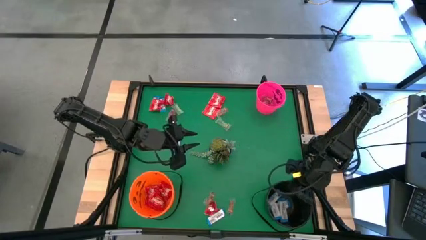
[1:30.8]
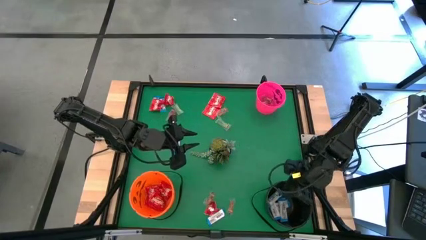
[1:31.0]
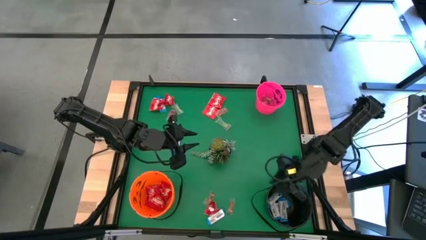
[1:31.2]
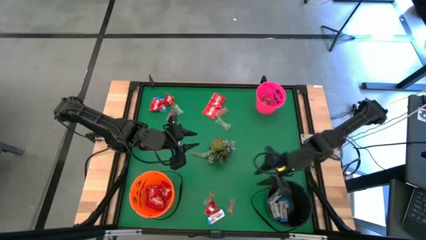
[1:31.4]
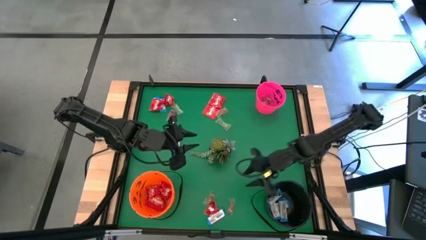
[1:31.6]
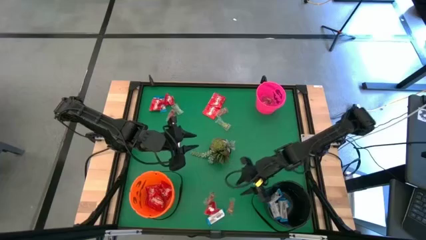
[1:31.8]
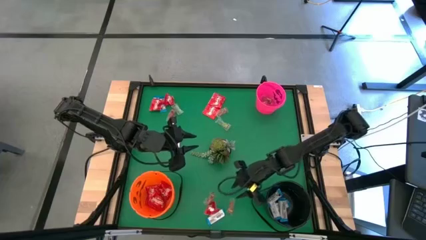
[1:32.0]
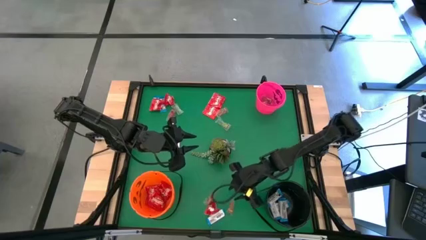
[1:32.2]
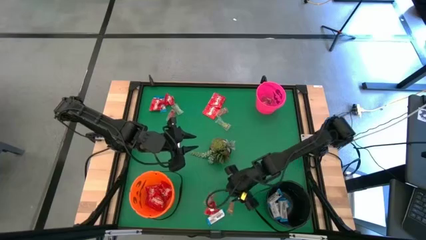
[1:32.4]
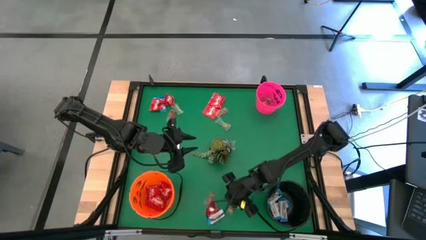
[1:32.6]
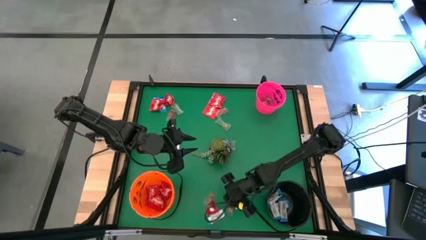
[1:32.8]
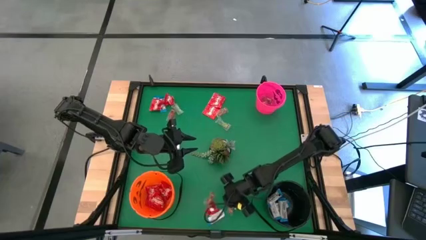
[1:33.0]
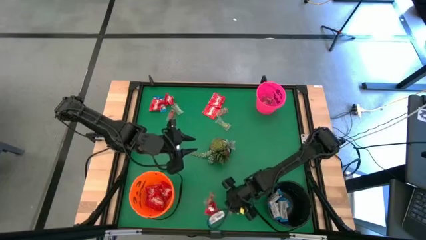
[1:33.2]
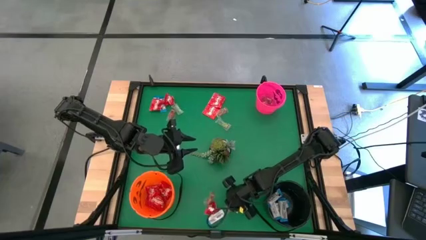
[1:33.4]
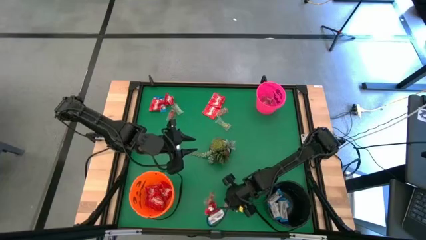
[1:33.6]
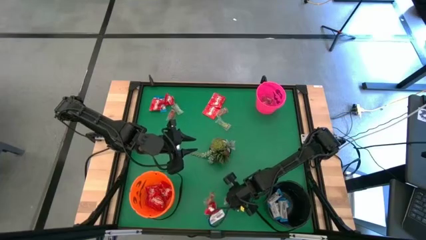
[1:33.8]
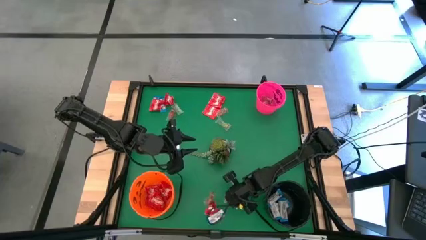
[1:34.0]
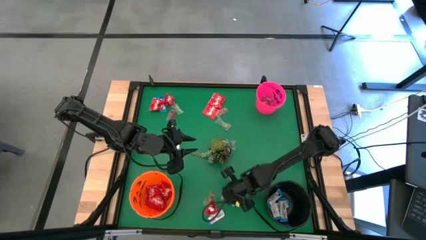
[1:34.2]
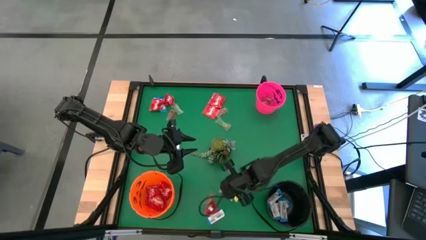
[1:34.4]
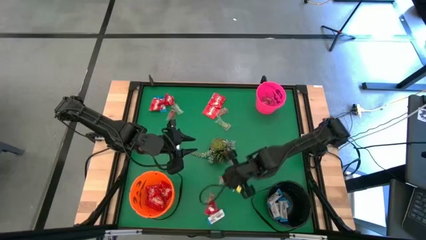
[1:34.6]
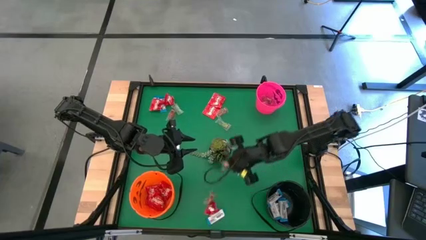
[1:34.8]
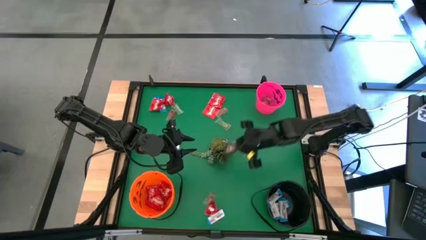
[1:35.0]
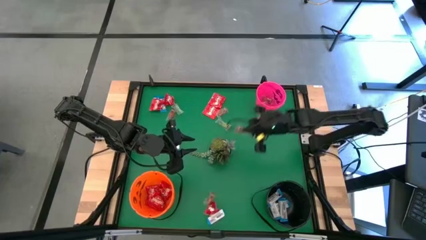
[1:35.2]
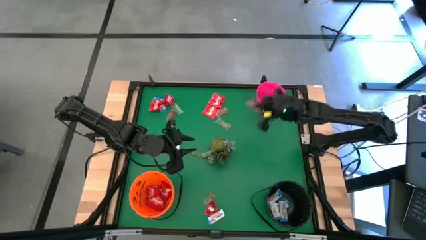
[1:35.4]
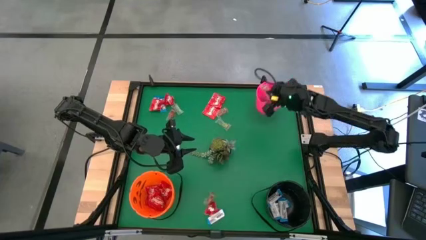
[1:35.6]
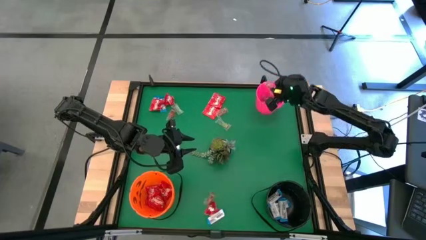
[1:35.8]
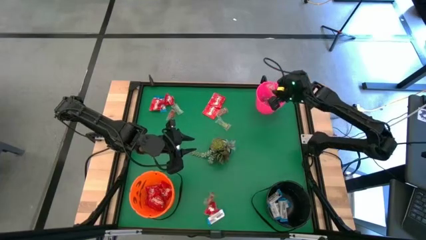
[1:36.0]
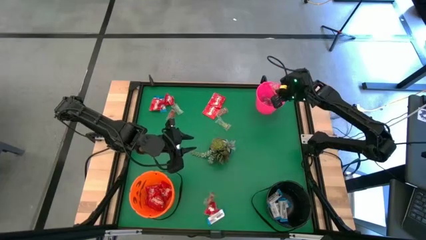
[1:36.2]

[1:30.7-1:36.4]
Task: Sort candy
Put the orange gummy into the pink bucket

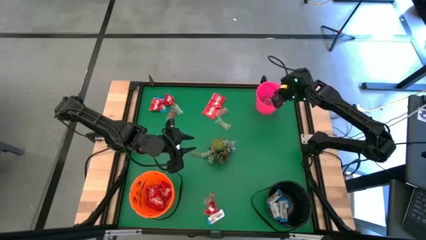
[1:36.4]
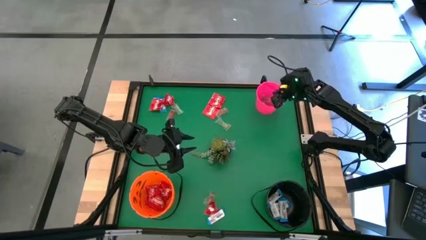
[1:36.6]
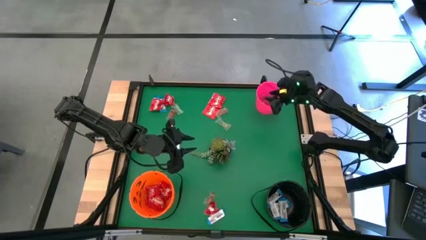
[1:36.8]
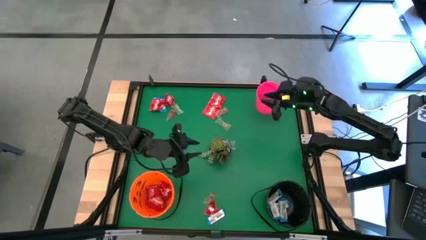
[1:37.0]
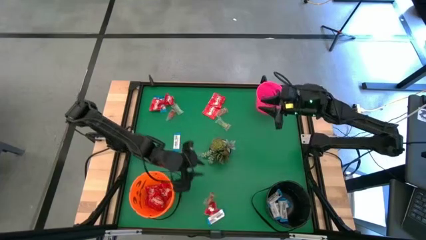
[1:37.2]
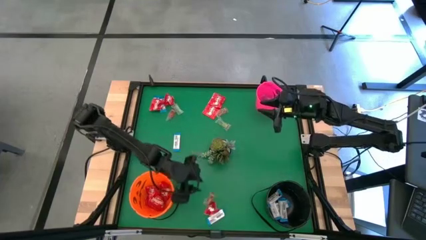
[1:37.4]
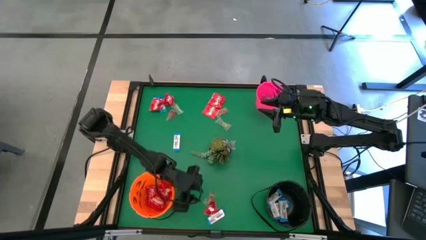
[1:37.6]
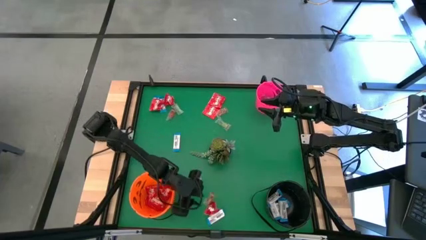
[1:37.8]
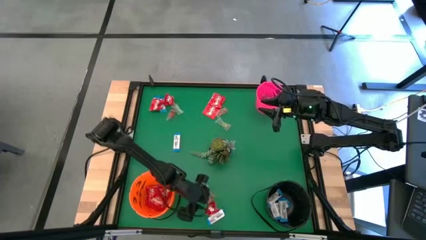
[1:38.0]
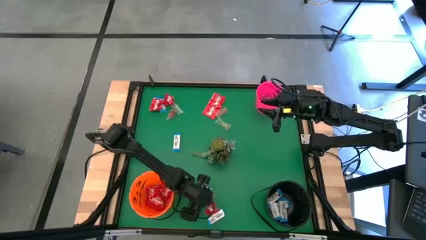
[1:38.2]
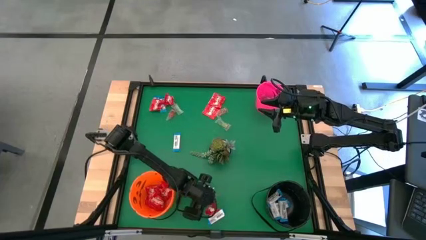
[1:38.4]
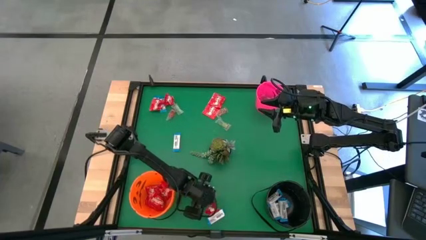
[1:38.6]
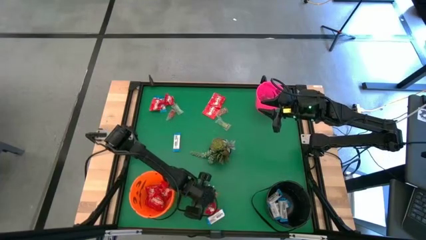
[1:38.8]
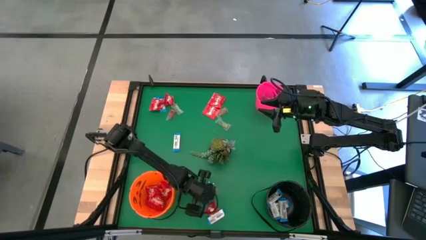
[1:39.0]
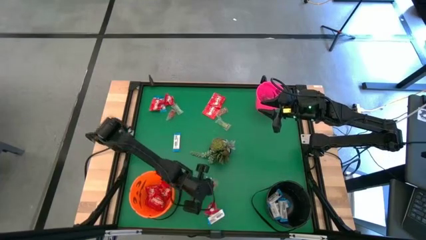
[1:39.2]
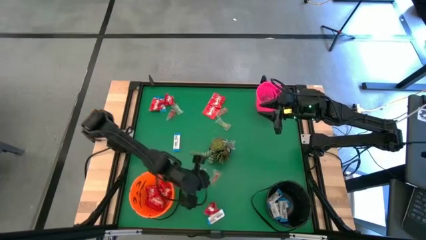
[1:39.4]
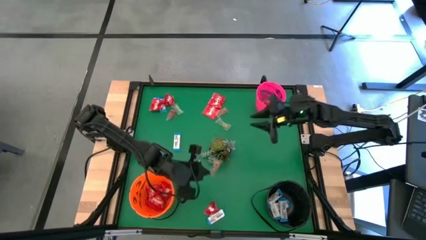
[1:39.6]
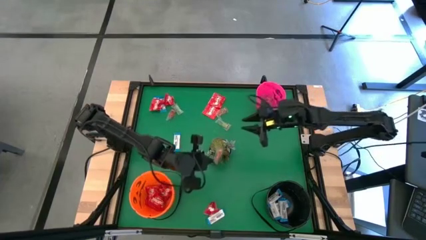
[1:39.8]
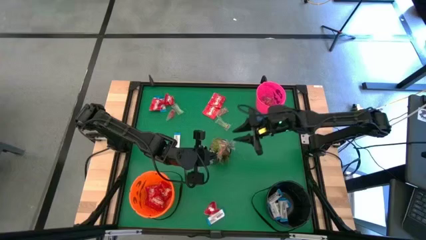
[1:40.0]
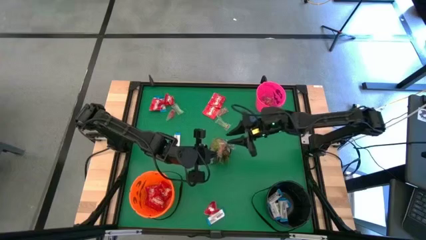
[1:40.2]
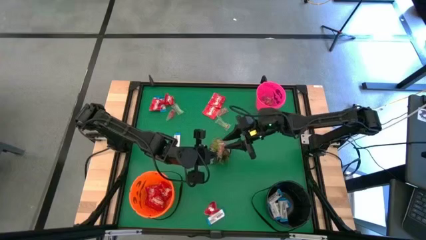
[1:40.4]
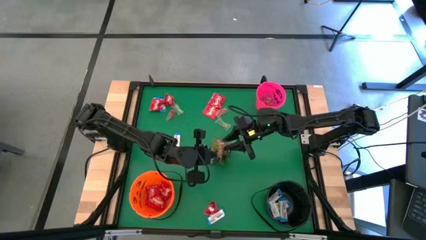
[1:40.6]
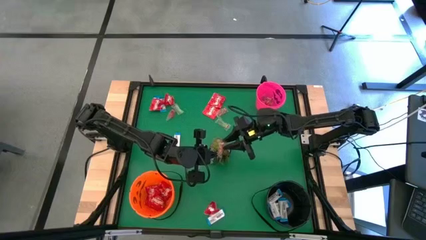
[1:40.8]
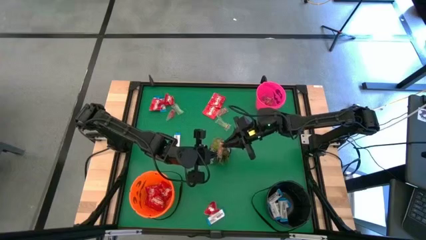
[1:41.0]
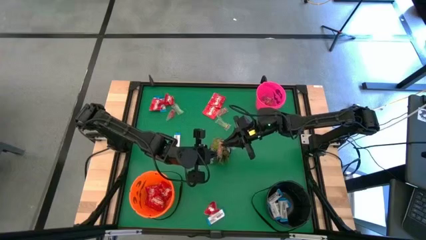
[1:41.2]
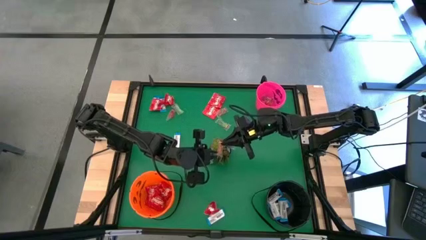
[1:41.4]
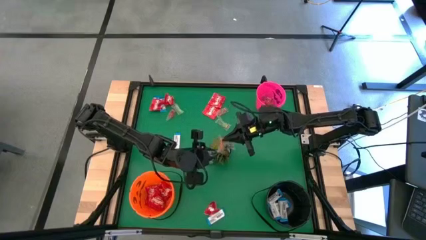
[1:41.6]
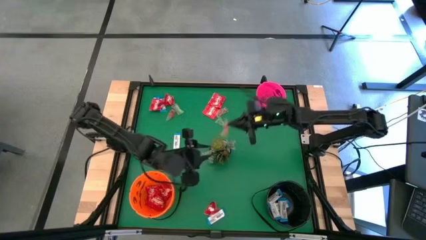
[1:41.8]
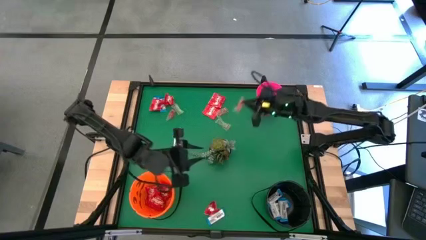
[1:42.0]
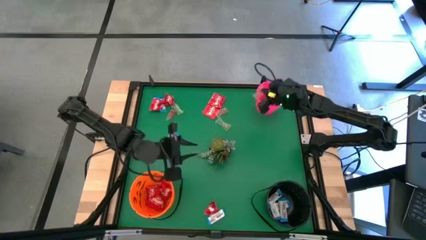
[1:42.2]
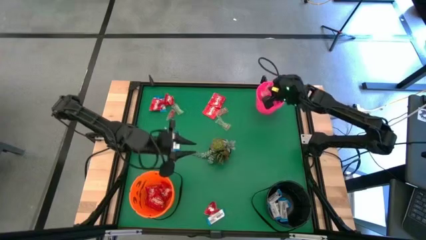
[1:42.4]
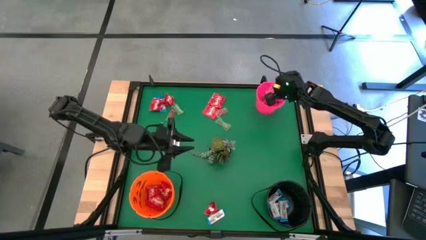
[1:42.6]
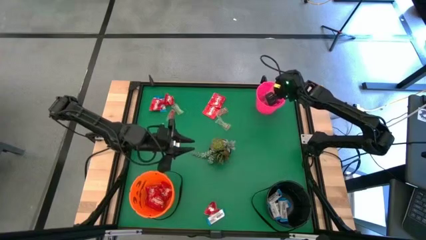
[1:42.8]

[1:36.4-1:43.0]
Put the orange gummy into the pink bucket

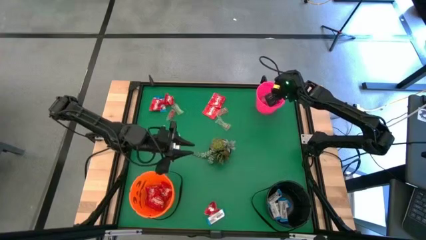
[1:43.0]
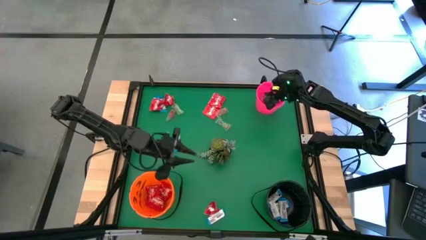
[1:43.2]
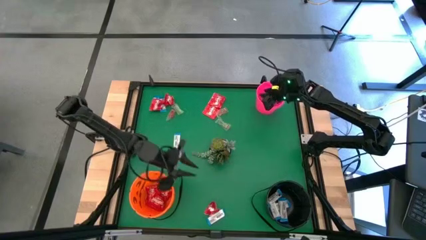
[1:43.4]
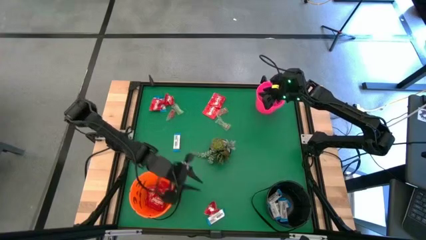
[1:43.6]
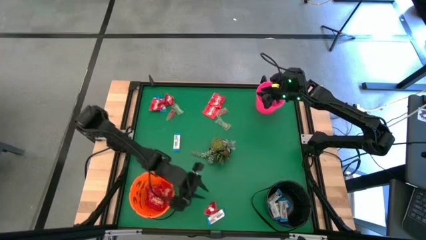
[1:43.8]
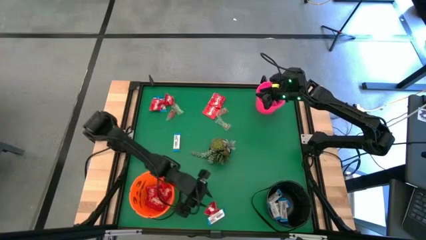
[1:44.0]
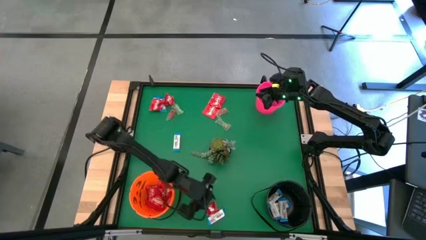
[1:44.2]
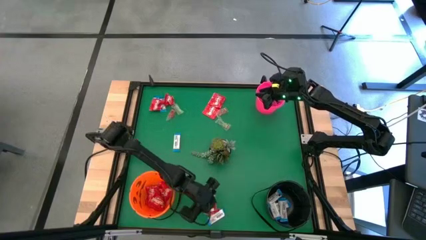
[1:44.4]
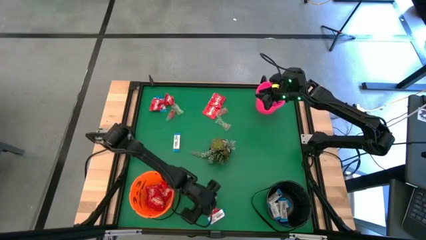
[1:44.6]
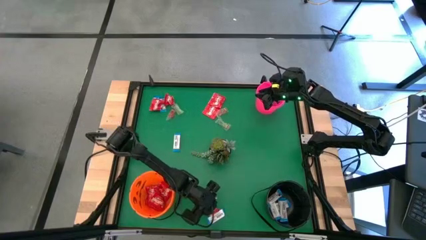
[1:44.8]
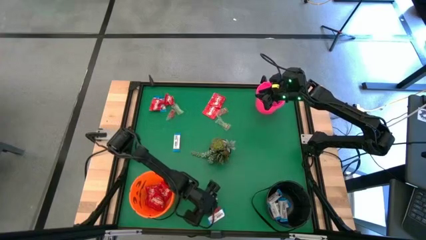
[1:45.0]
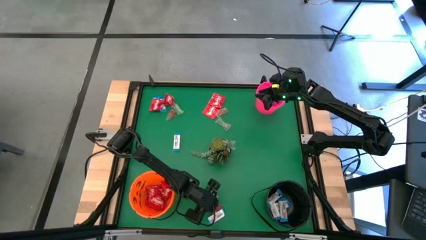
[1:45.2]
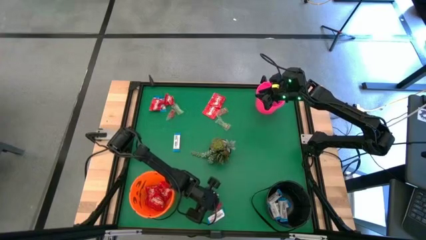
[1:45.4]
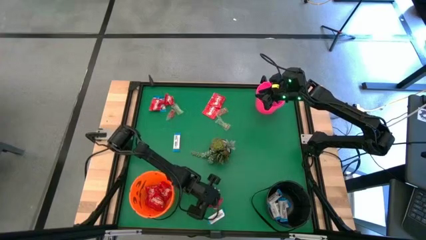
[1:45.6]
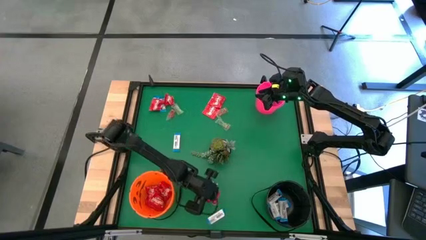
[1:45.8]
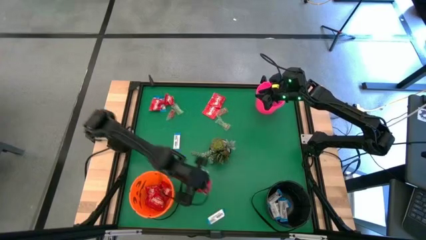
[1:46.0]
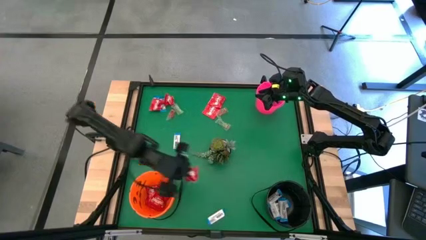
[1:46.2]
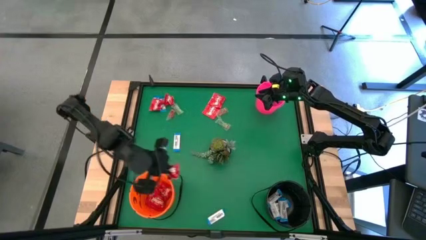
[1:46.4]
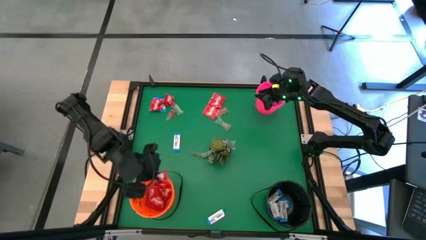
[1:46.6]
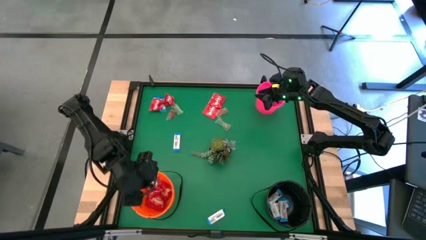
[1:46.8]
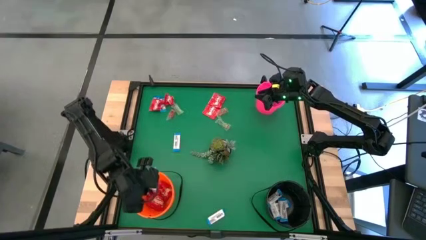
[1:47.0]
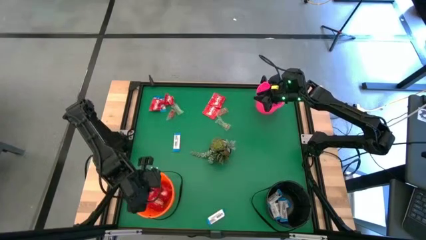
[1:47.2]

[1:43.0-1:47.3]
Put the red candy into the orange bucket

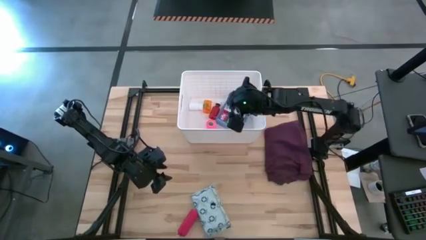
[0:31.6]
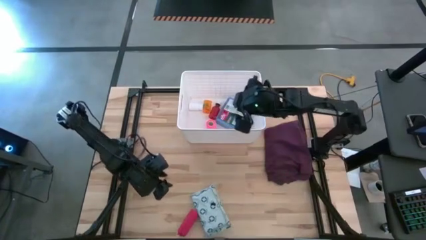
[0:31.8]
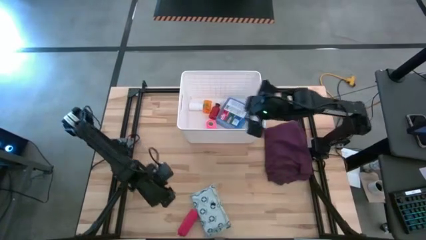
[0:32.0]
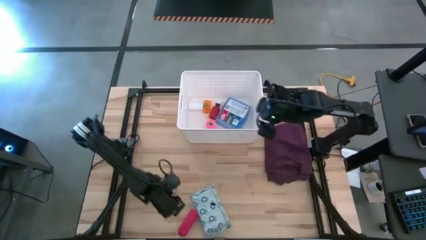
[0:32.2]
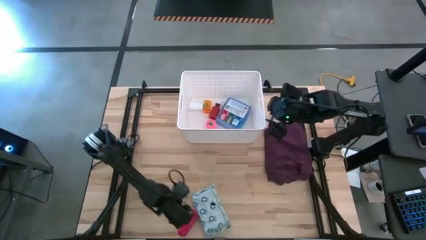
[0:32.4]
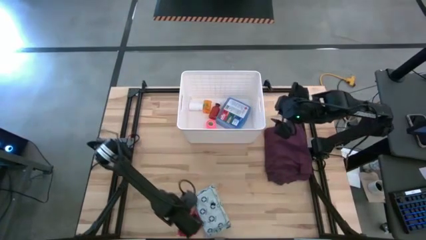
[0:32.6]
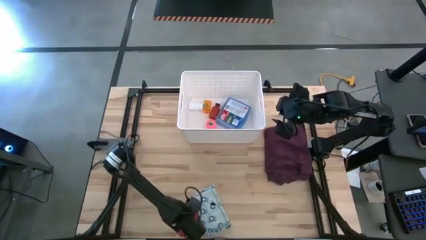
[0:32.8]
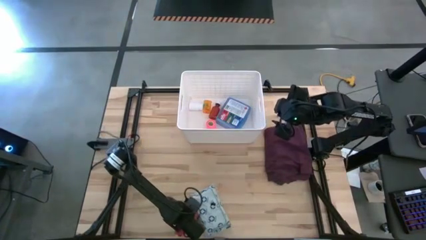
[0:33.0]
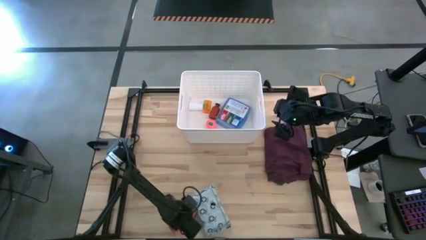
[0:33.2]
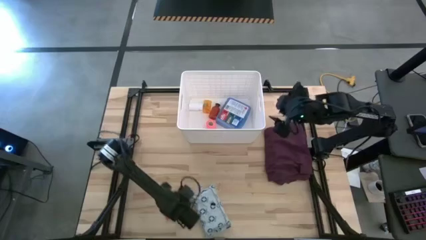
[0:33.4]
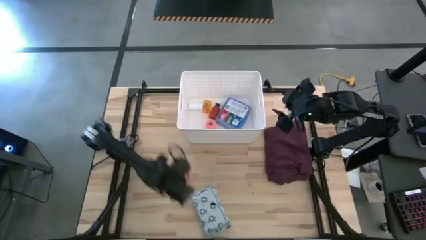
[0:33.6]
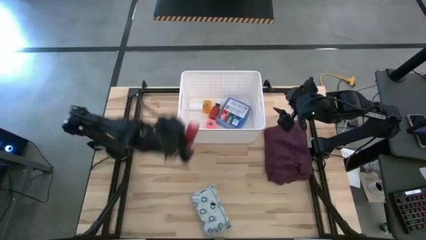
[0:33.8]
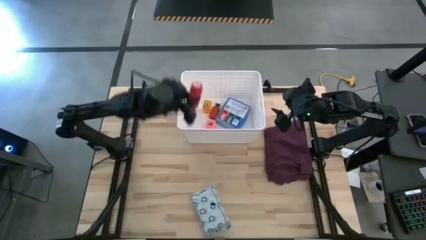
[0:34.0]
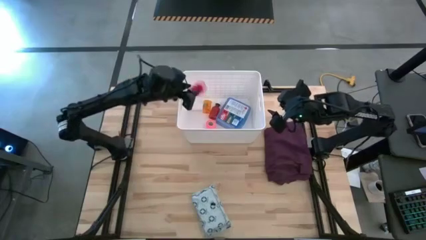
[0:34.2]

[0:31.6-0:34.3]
Task: Pick & place medical supplies in basket/bin
Put the large pink bandage into the white bin
